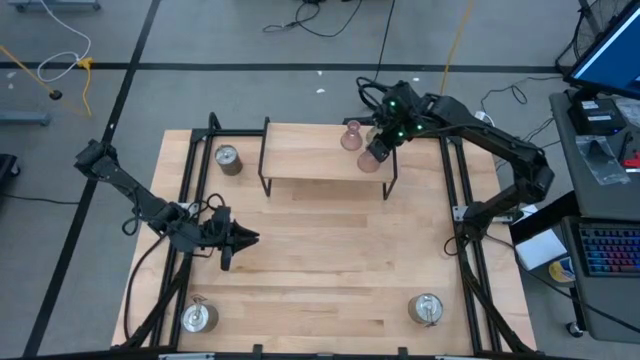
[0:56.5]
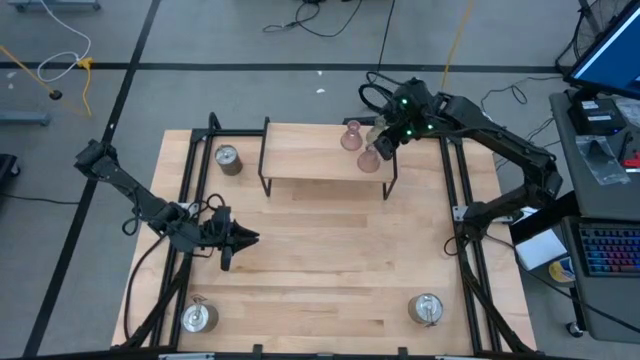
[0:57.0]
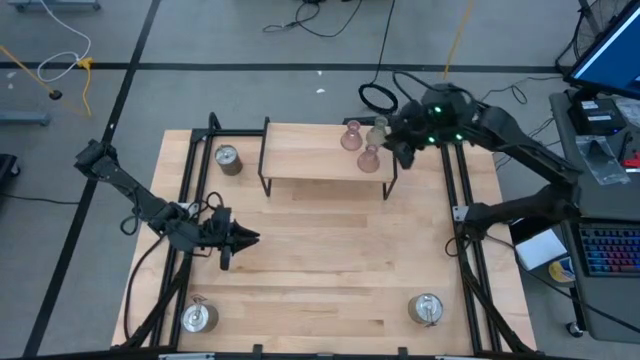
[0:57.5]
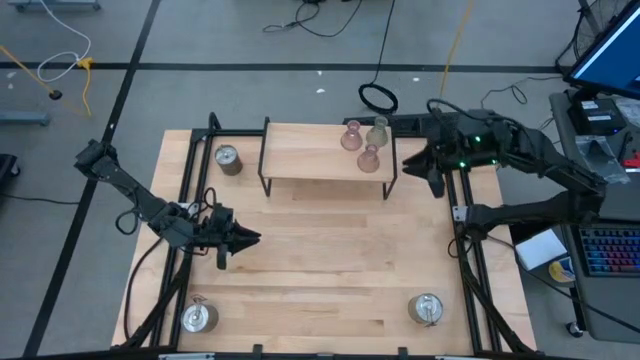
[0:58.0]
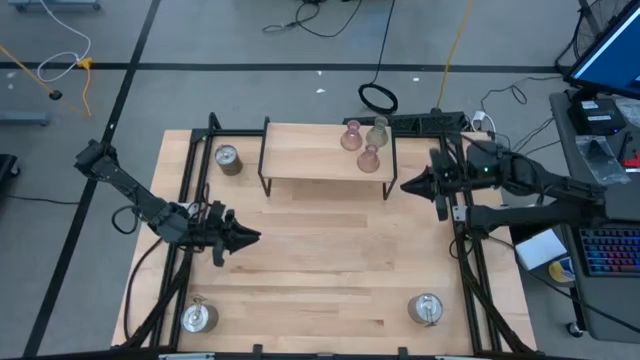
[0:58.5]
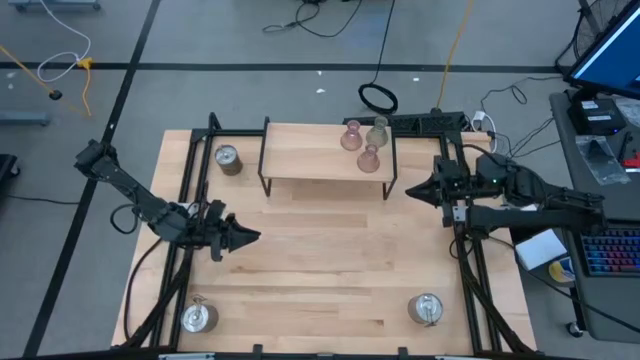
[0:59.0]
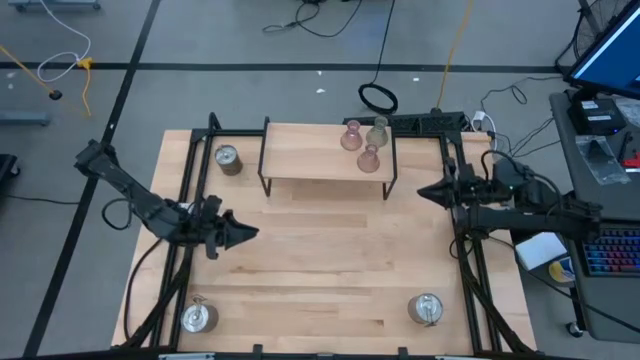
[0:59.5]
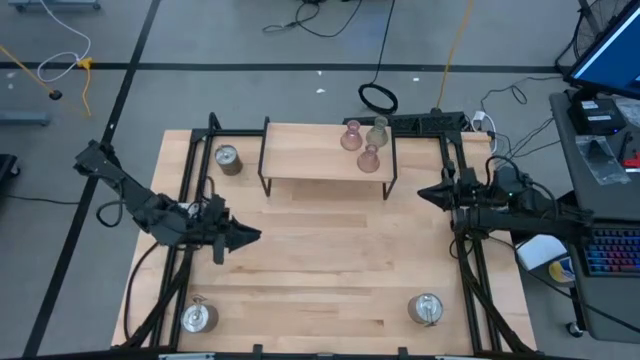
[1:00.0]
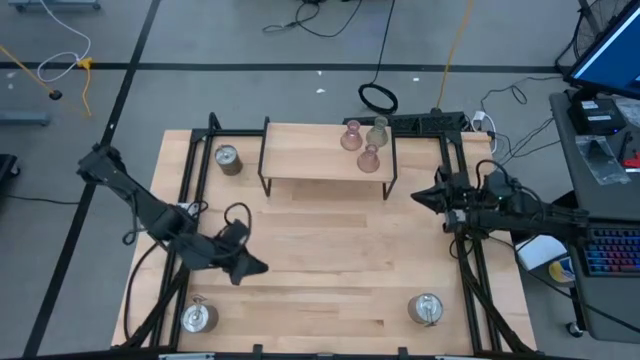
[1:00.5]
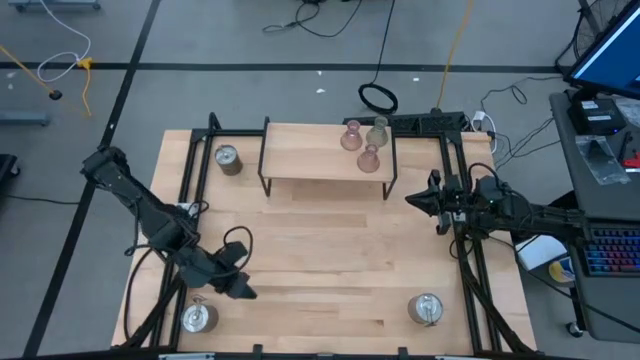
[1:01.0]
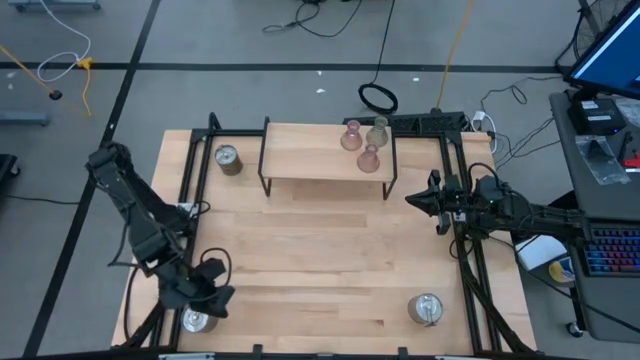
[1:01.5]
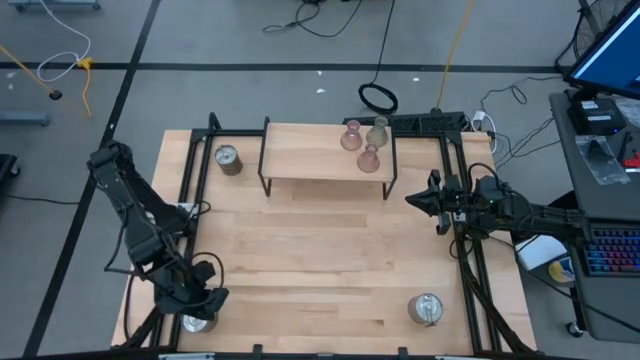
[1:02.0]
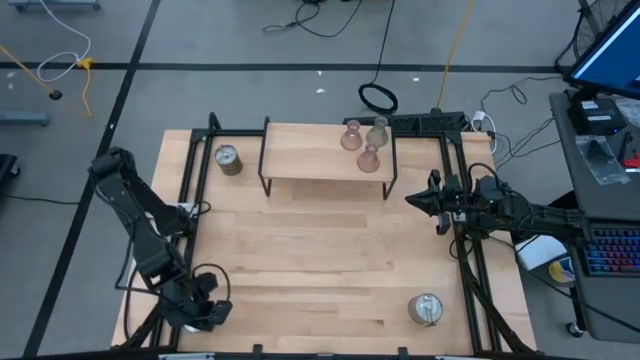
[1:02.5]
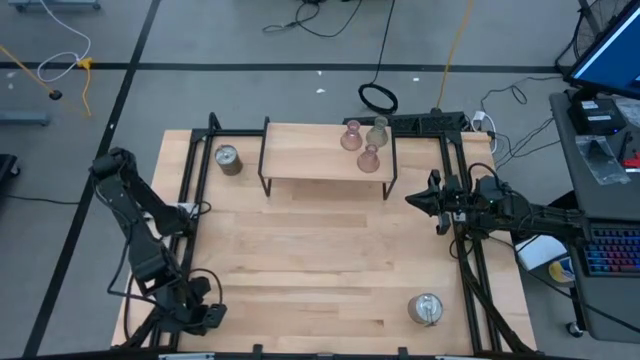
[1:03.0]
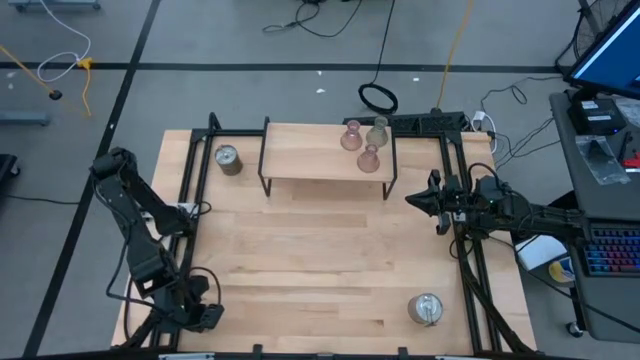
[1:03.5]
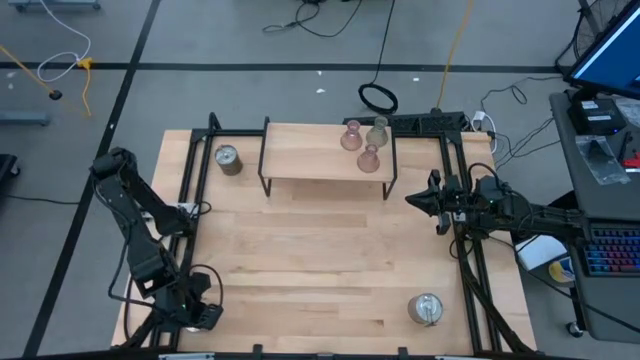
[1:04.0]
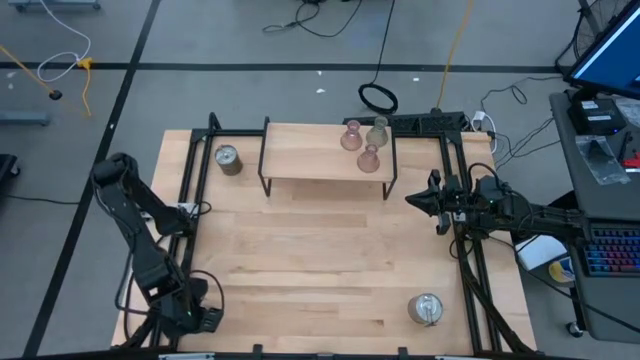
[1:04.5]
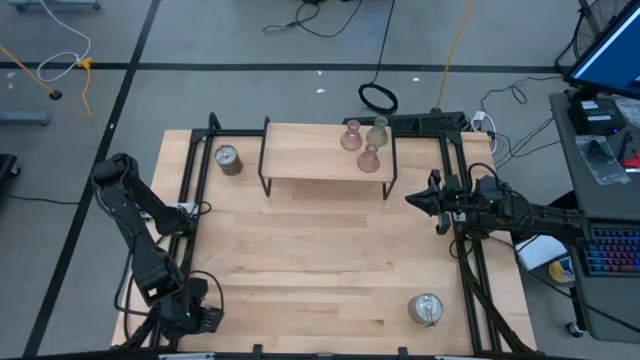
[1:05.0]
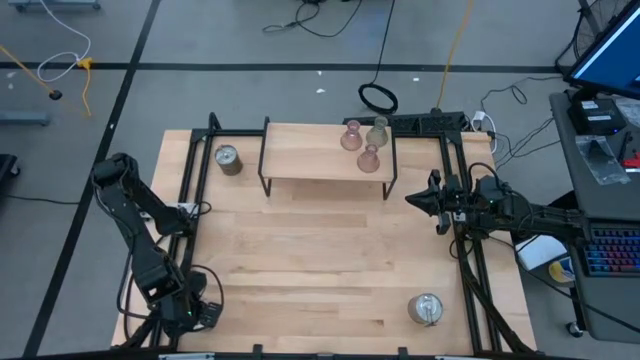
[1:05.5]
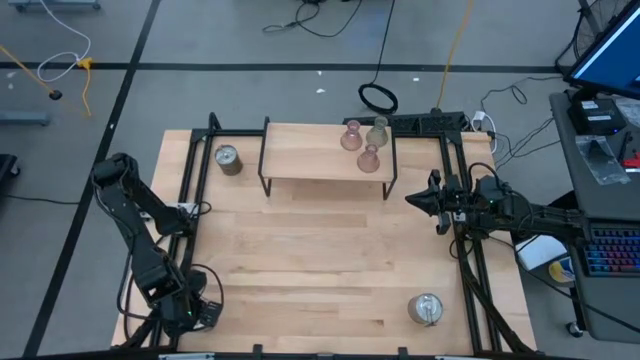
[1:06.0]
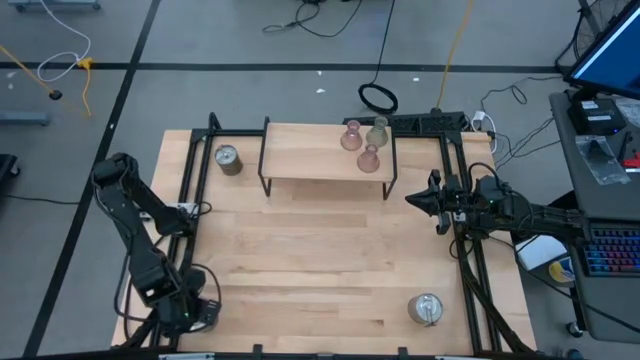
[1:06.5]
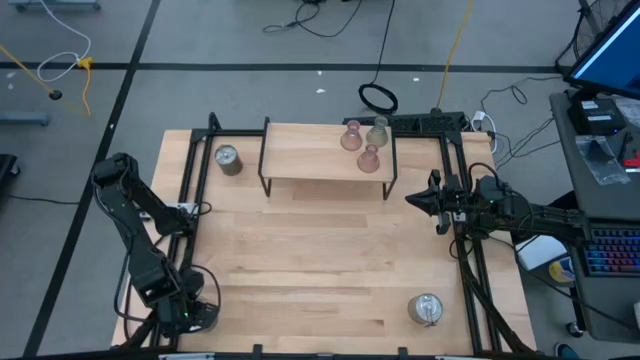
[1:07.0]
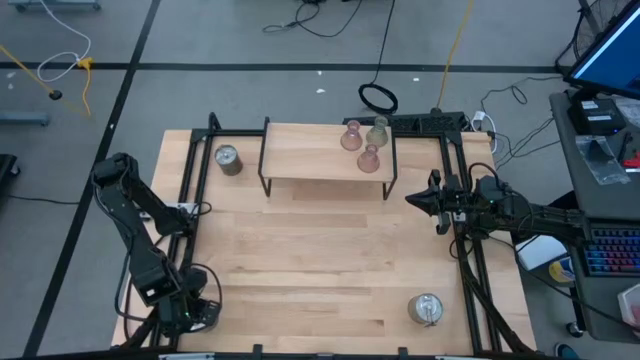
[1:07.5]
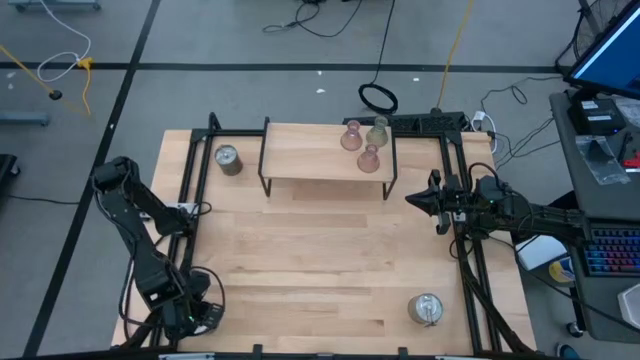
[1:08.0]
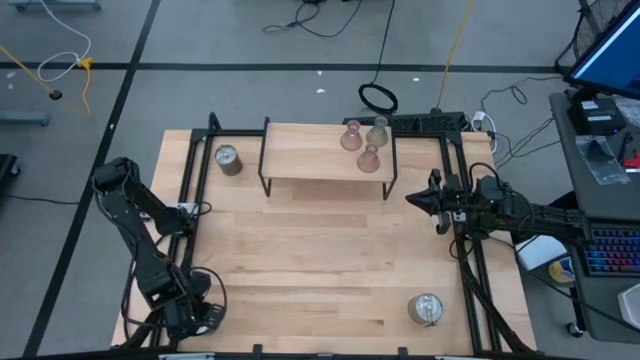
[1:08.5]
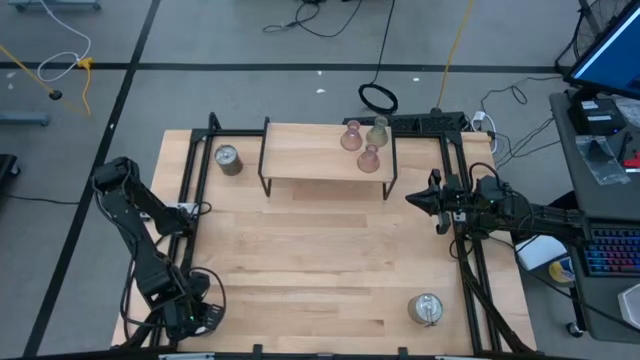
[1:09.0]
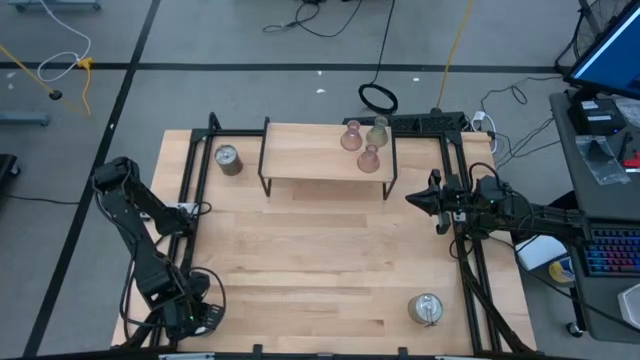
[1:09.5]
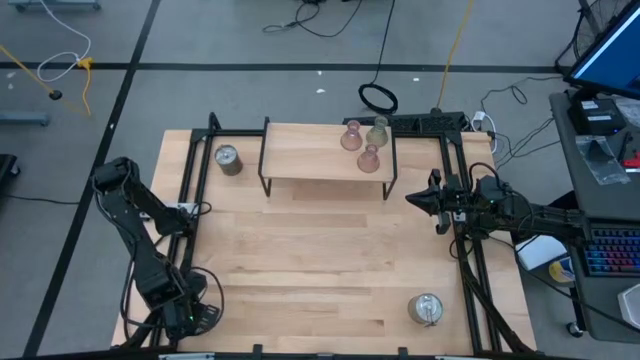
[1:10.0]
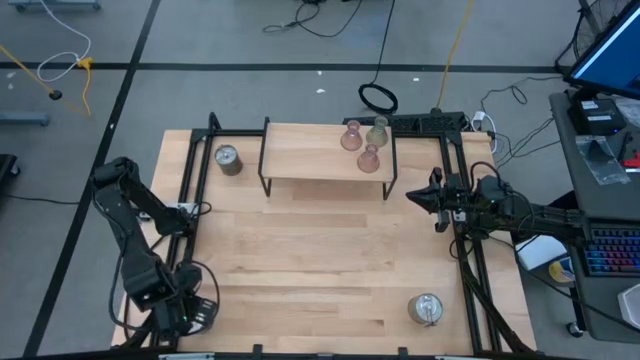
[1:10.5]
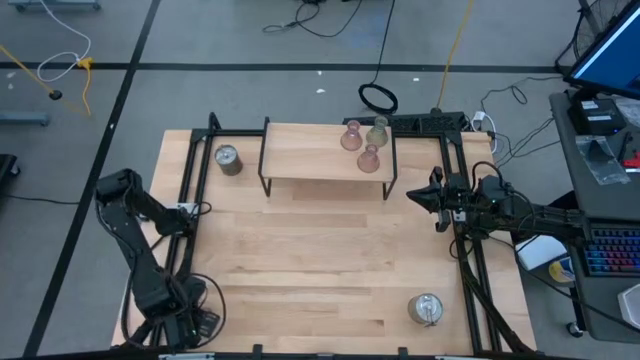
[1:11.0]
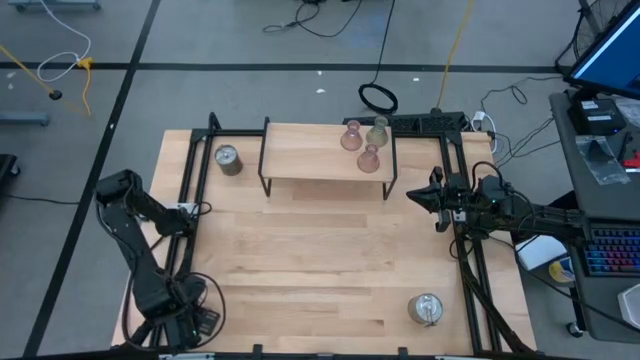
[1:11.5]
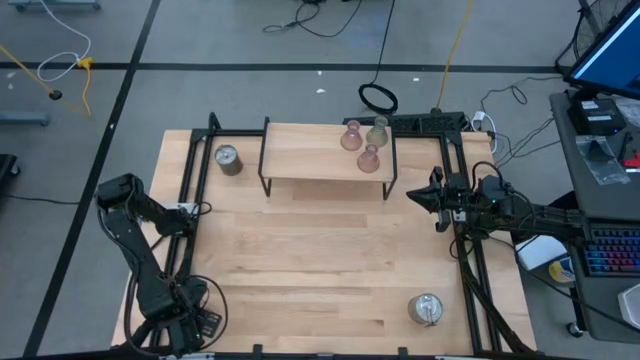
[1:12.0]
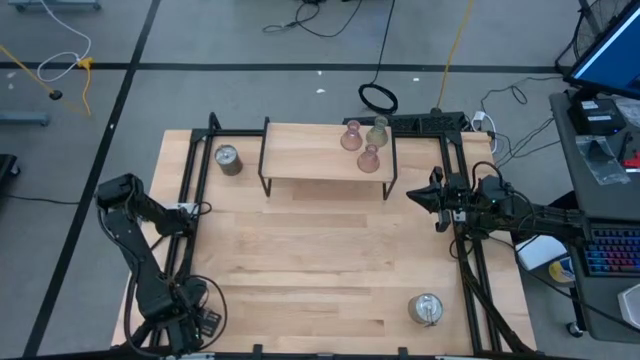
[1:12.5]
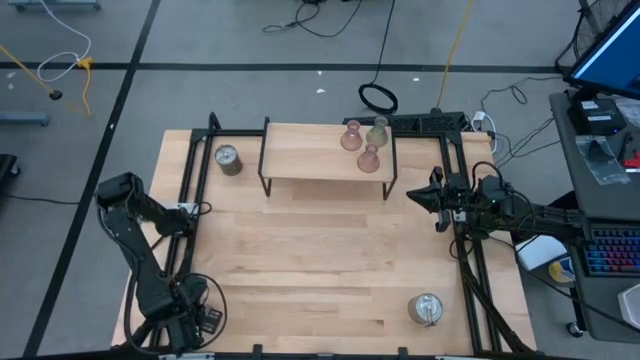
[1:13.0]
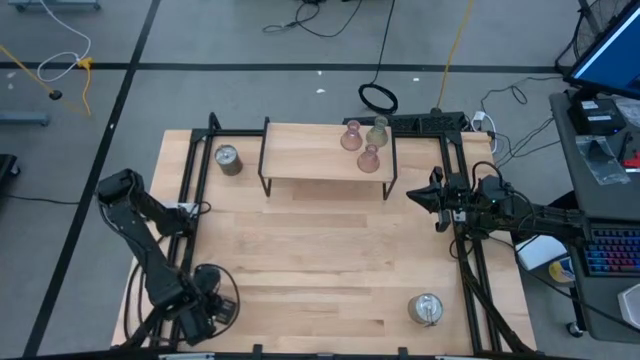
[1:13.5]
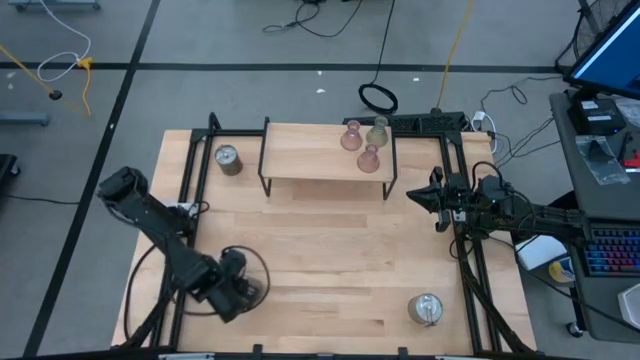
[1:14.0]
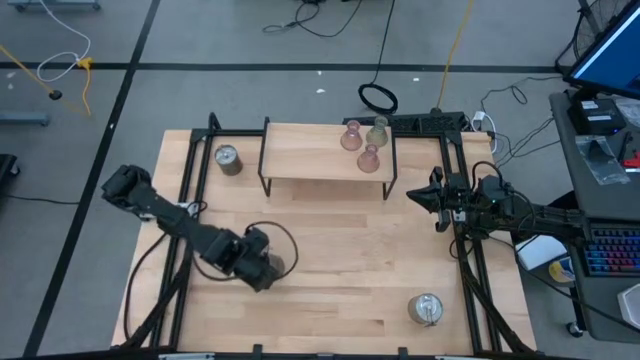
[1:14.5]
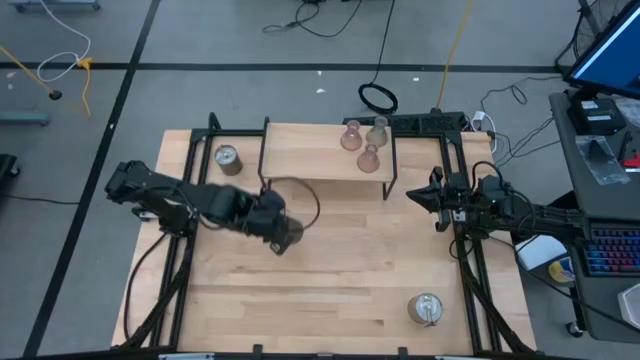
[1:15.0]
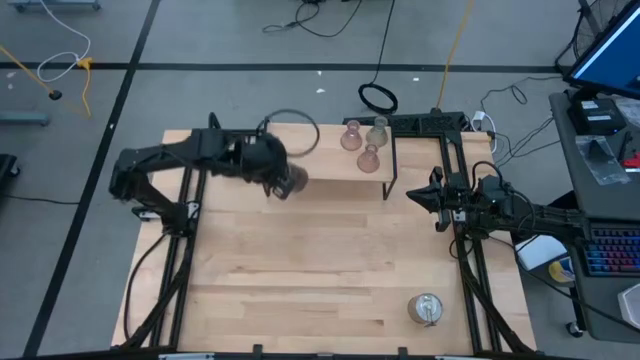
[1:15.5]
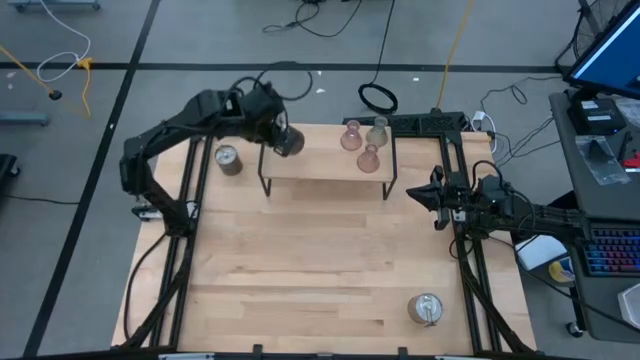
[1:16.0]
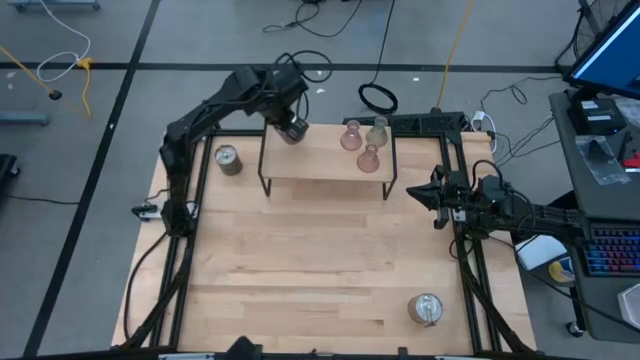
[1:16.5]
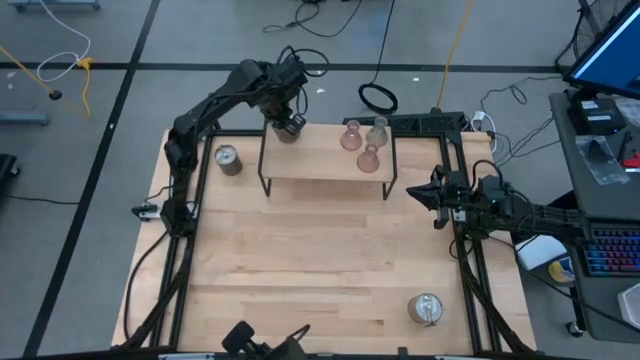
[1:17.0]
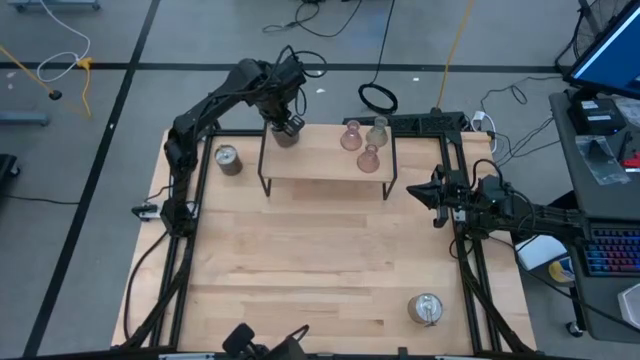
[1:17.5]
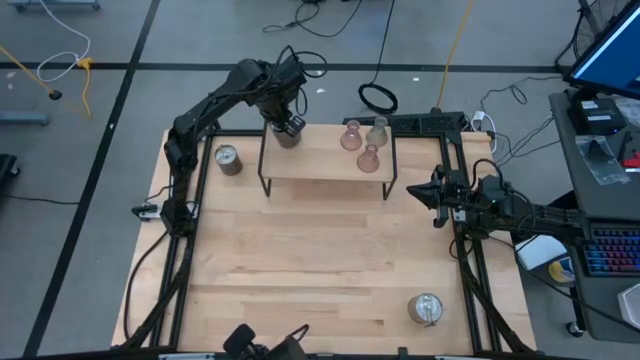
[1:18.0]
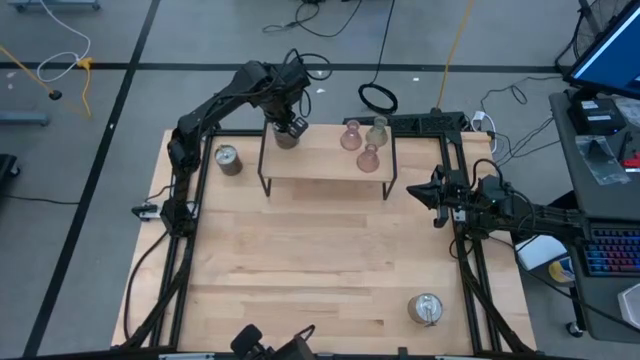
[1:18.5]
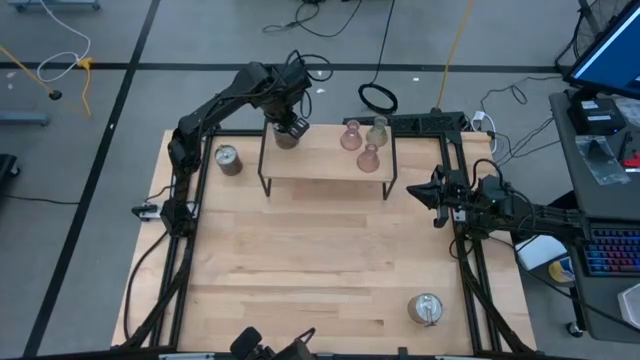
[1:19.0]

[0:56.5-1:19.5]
Task: Pick & Place candle stick holders
Put the bottom left silver scented candle on the shelf
